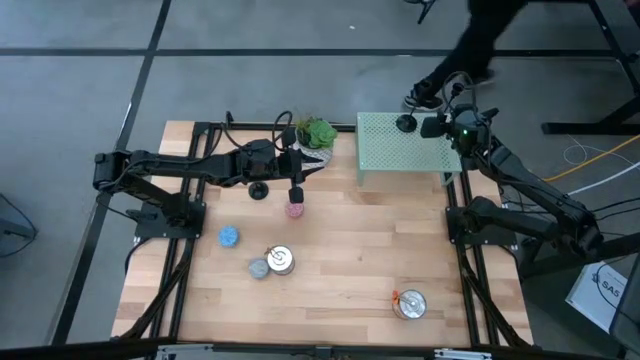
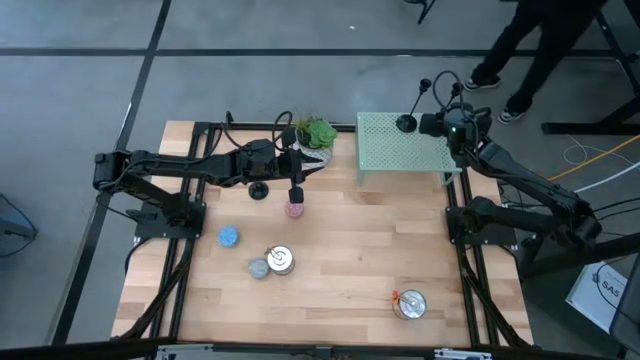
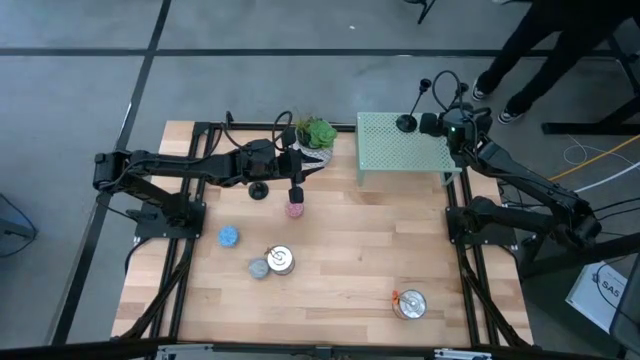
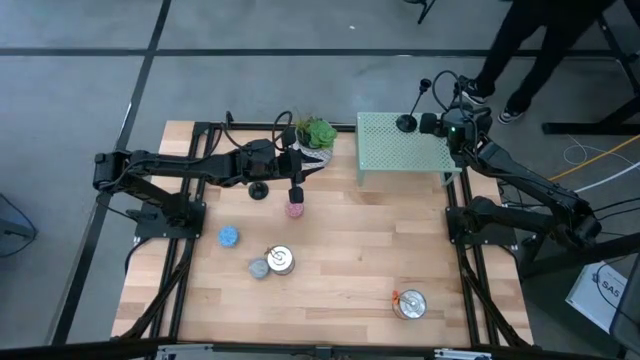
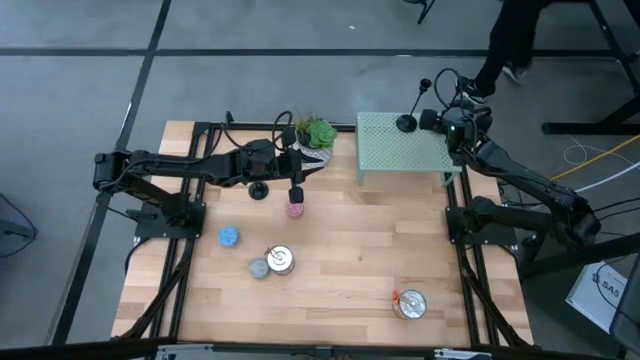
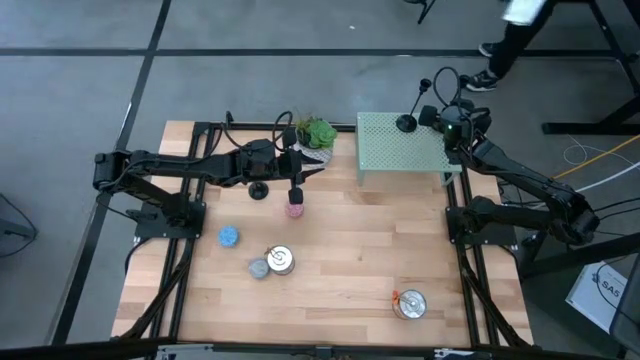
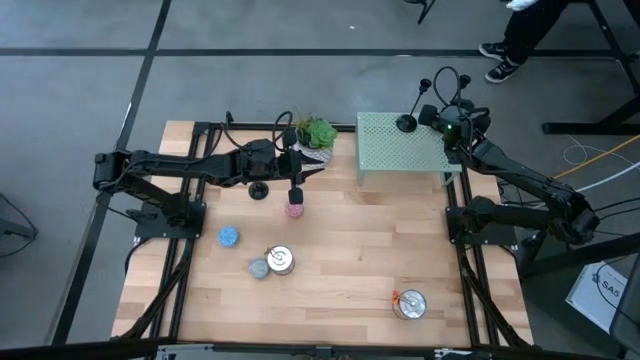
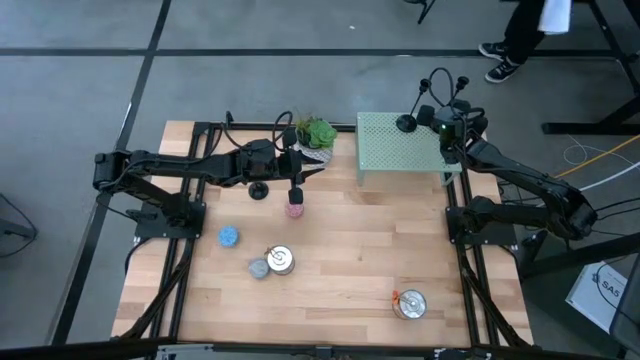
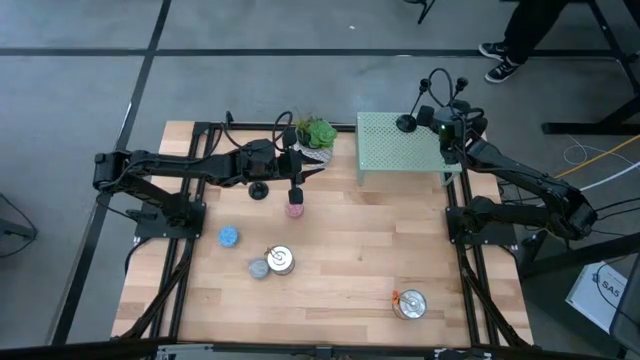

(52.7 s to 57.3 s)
Task: Pick & Place candle stick holders
Adjust the black candle holder on the shelf

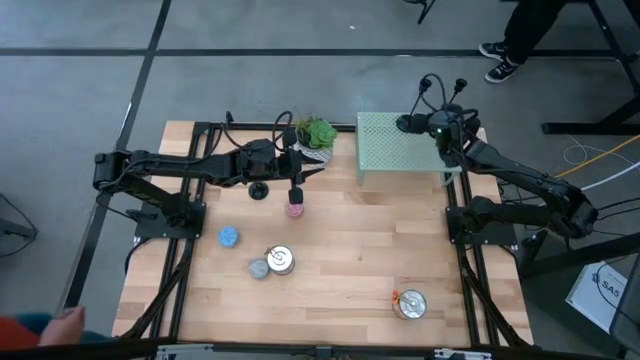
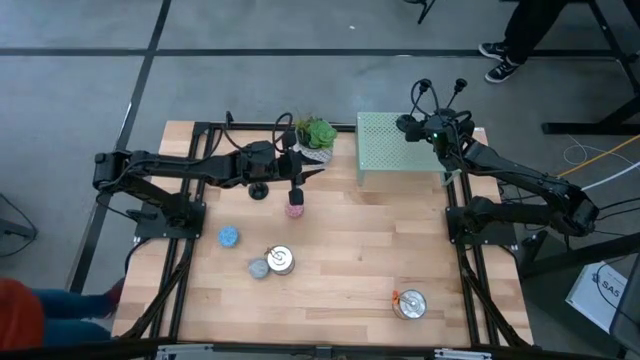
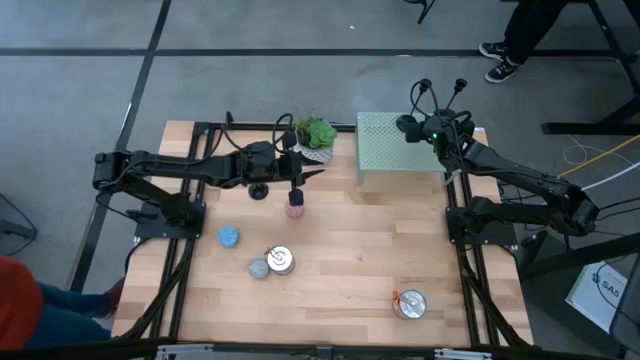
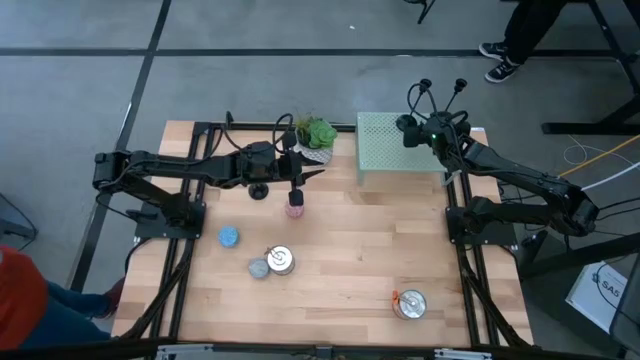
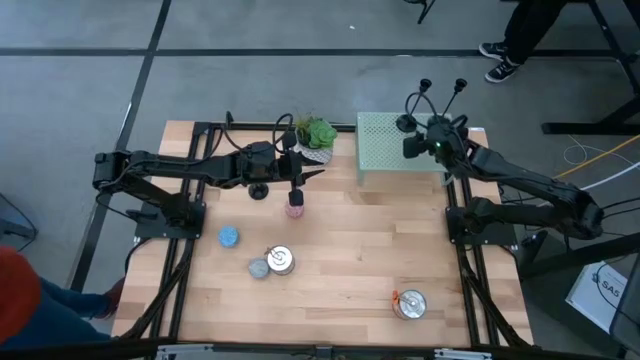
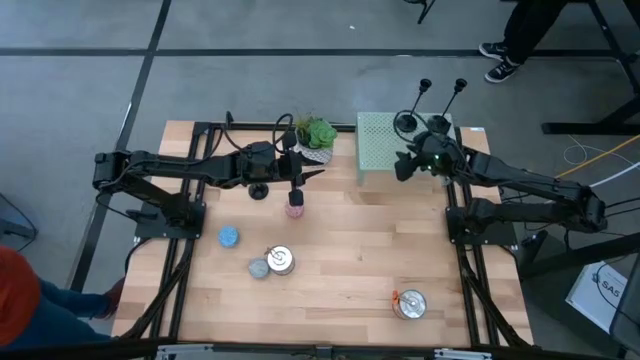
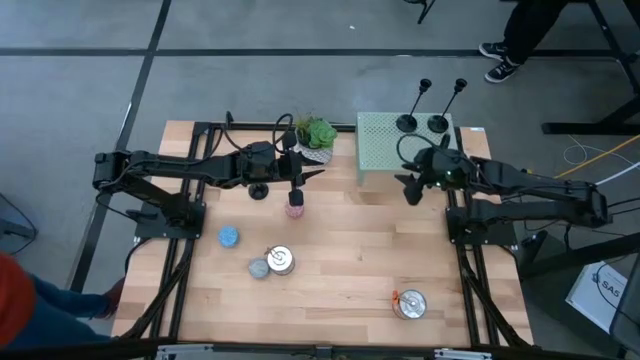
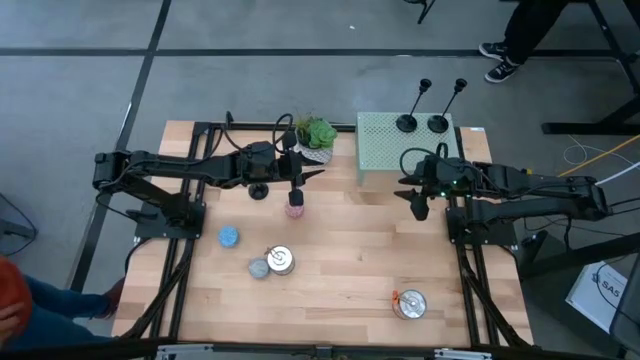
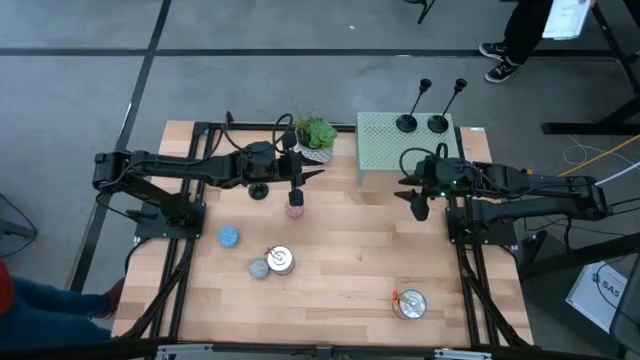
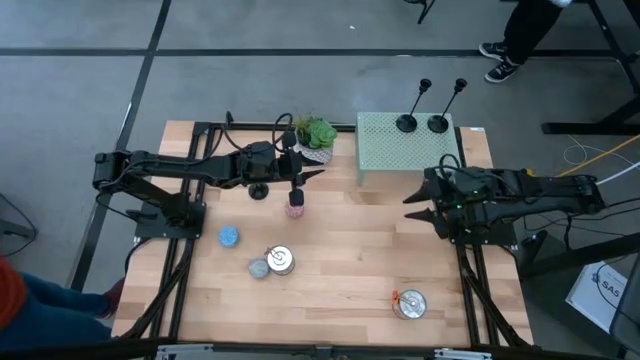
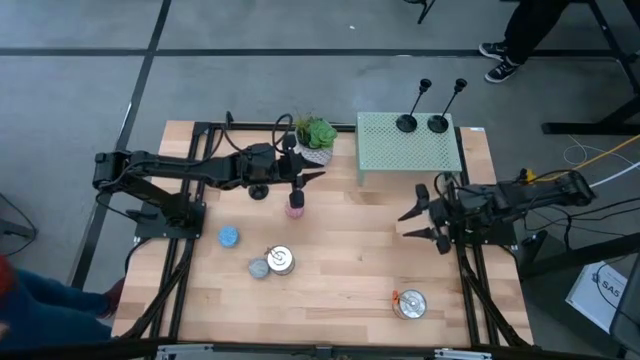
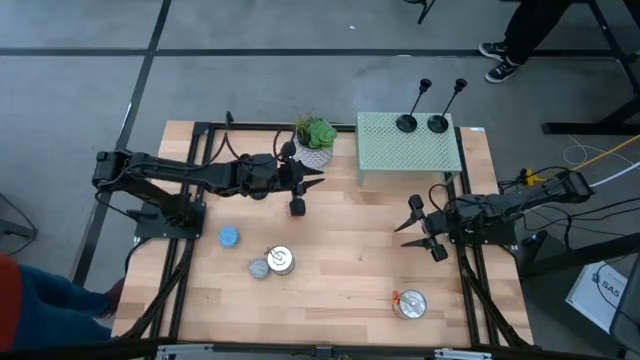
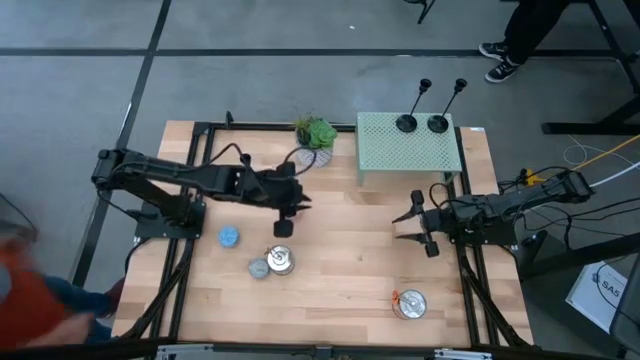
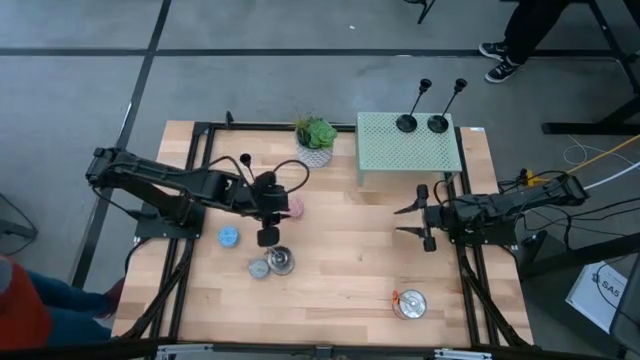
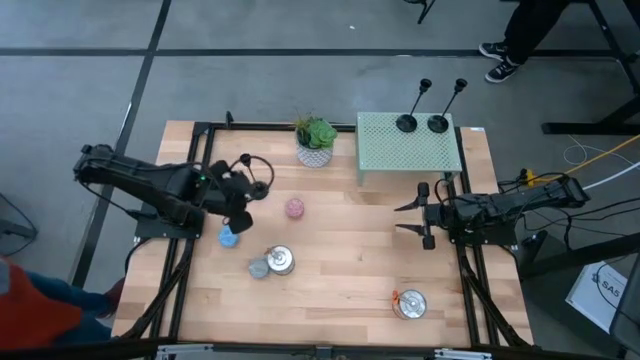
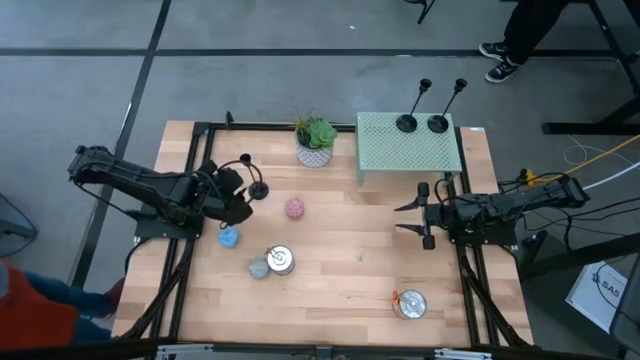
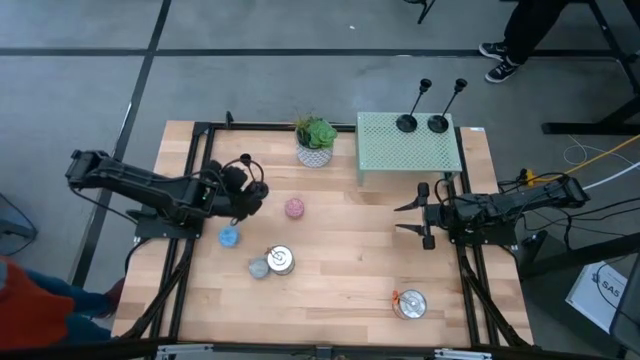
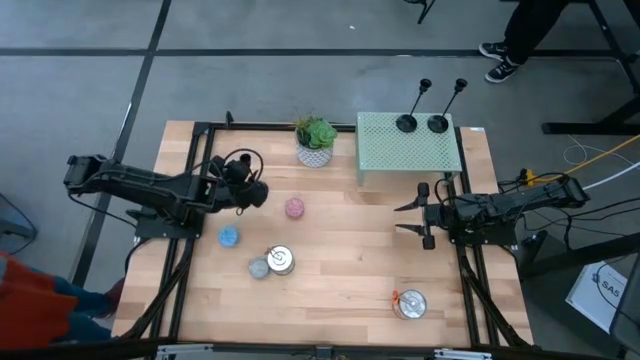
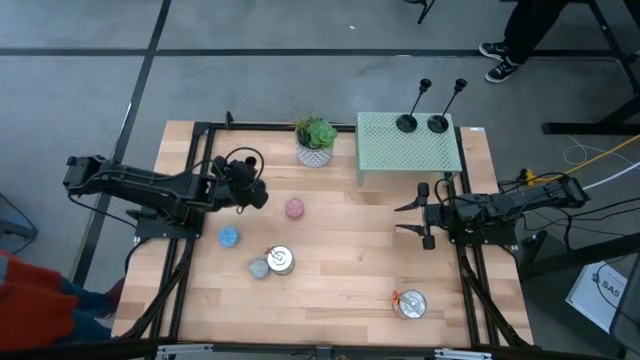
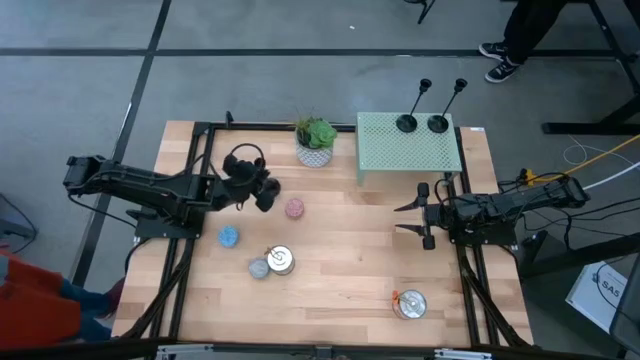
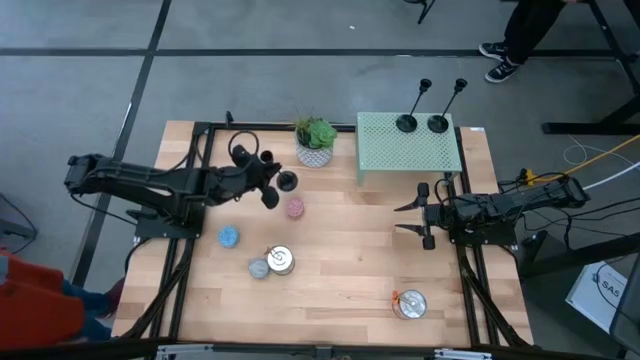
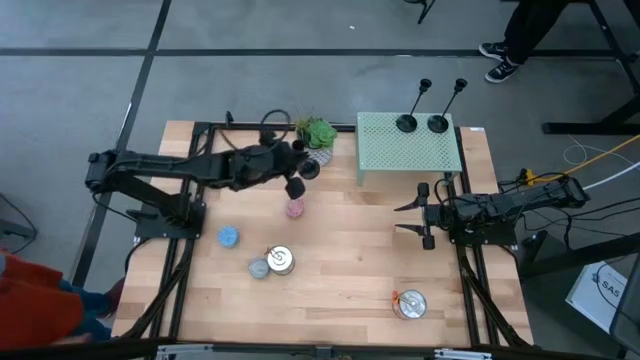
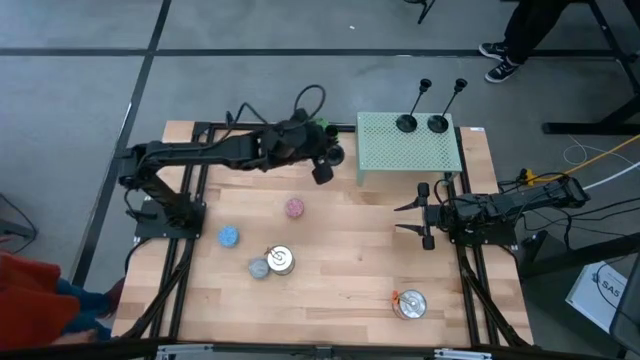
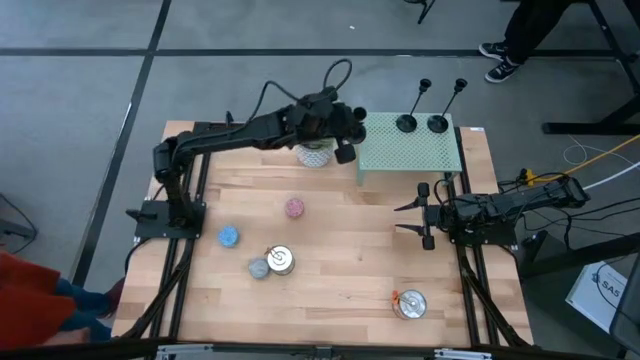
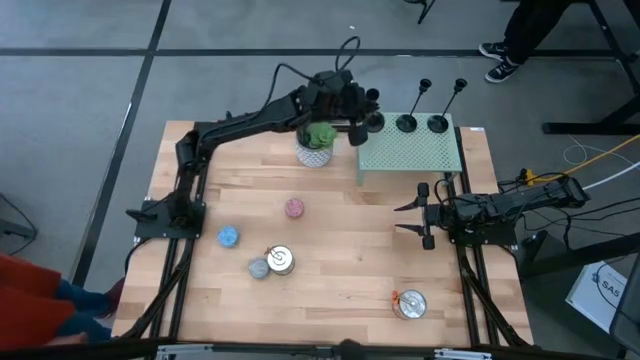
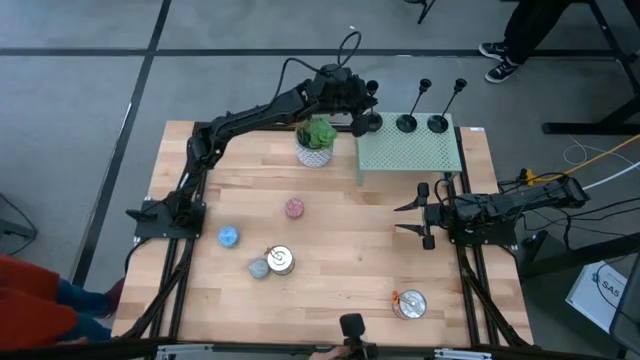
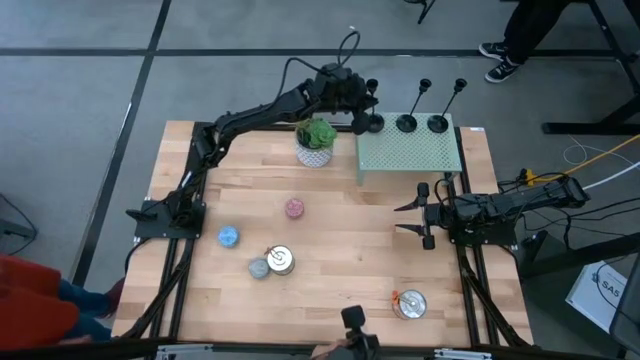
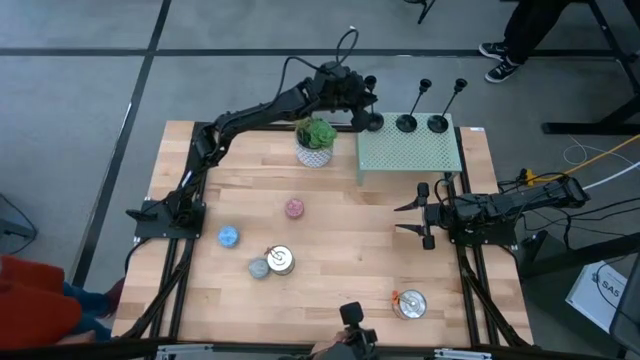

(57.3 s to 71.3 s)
Put the black candle holder and aligned with other black candle holder on the shelf

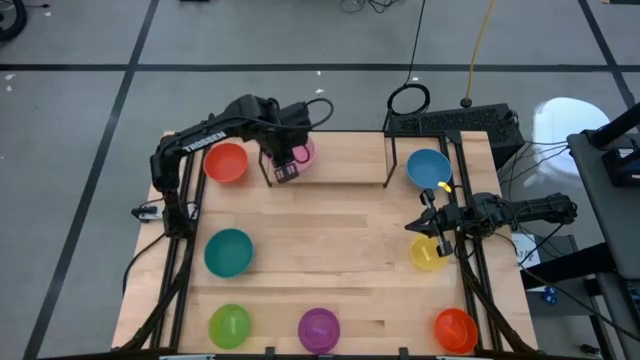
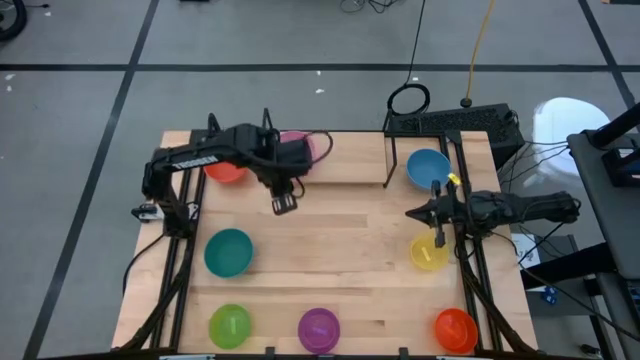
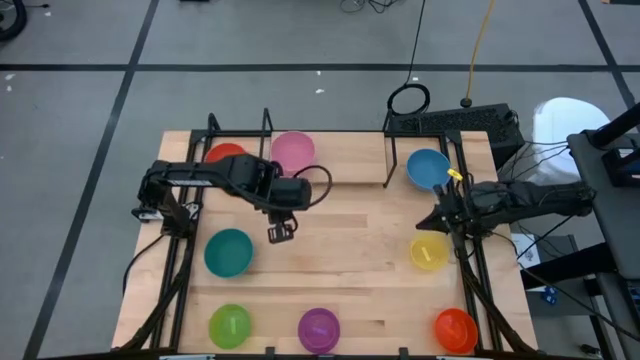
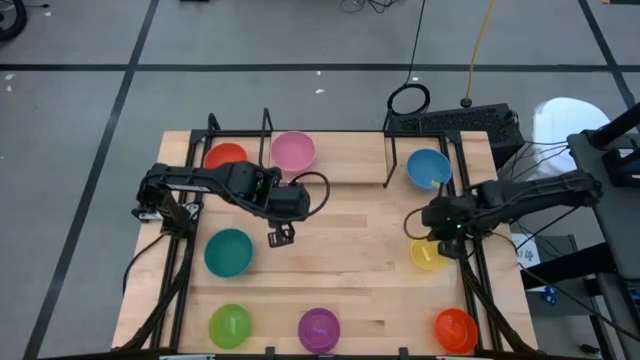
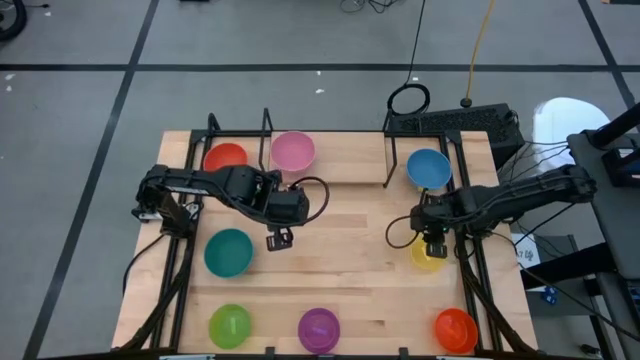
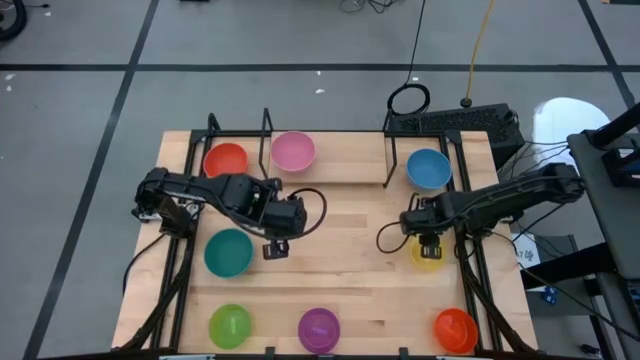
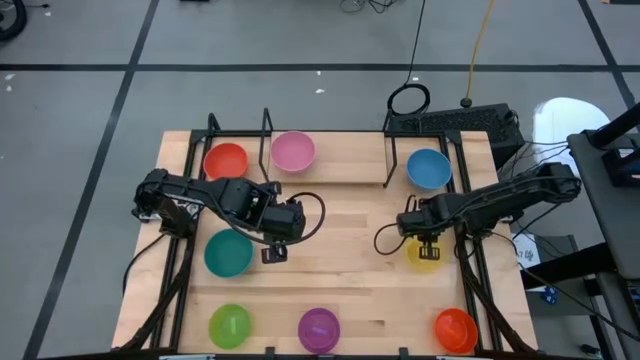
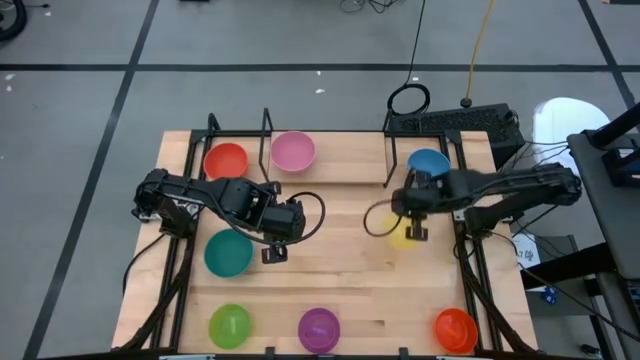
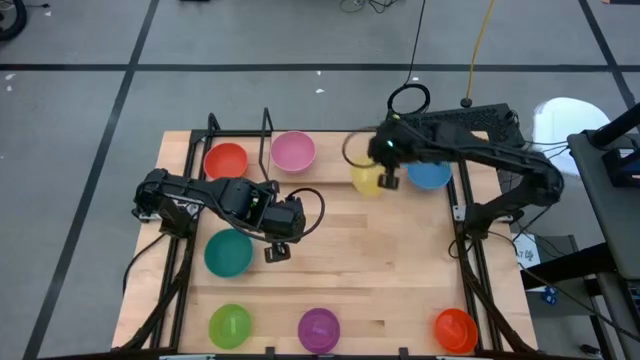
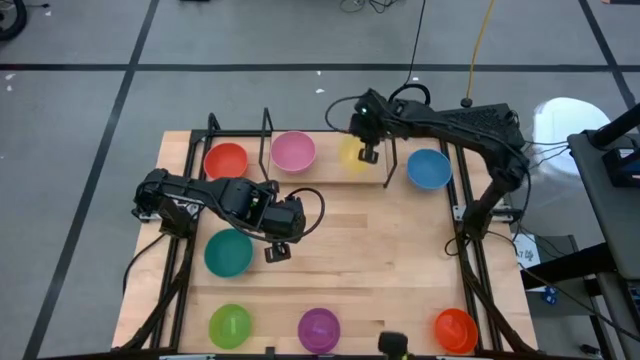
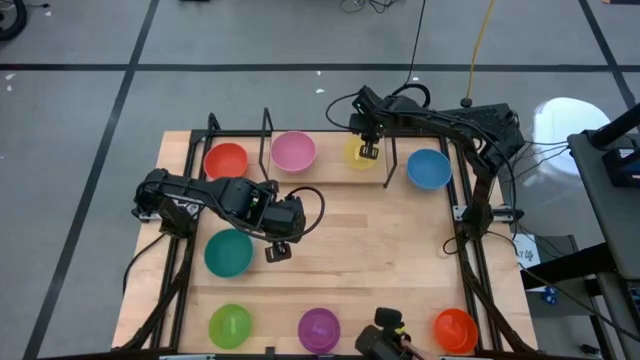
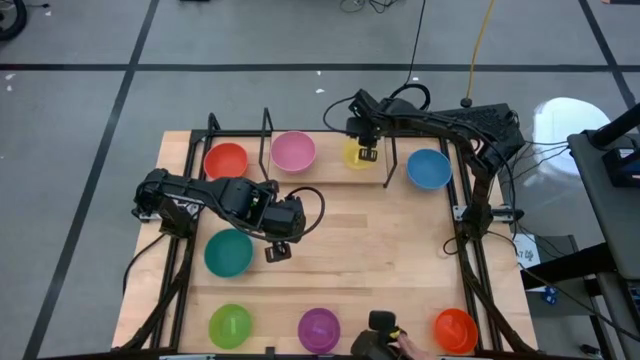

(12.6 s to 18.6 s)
Task: Place and stack bowls onto a shelf
Put the yellow bowl on the shelf
